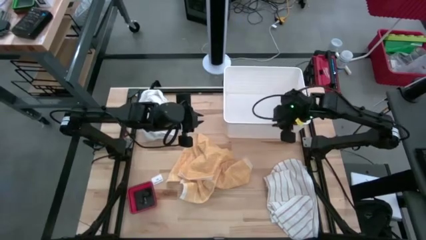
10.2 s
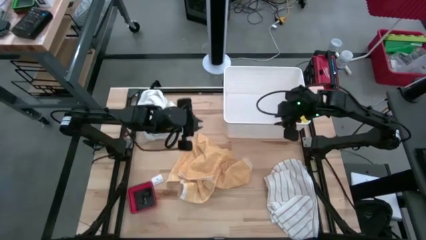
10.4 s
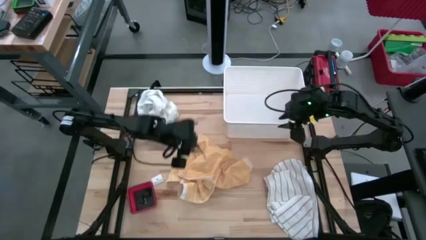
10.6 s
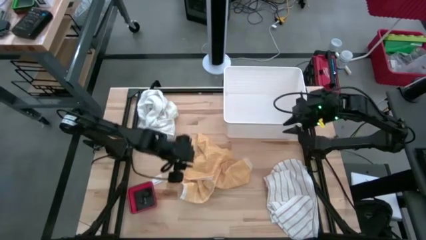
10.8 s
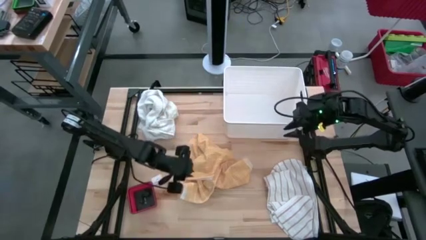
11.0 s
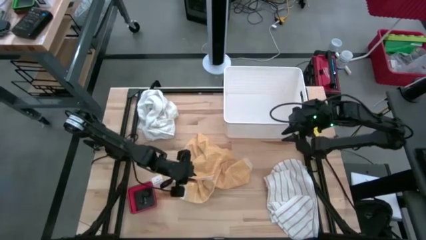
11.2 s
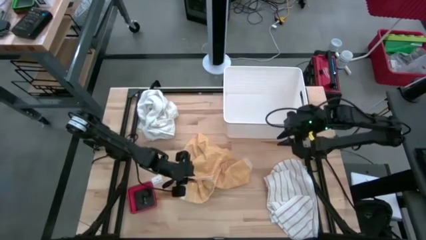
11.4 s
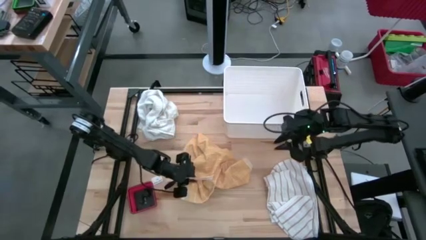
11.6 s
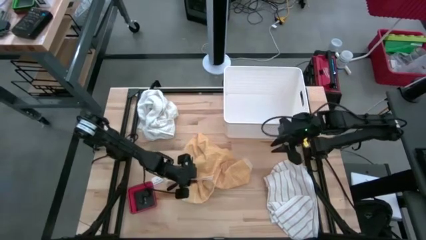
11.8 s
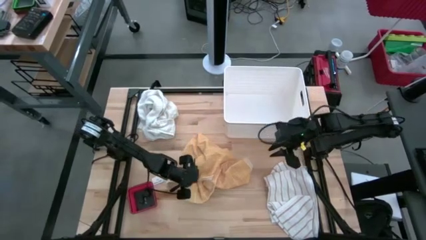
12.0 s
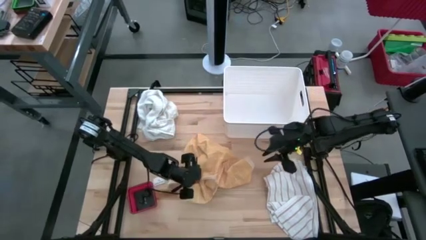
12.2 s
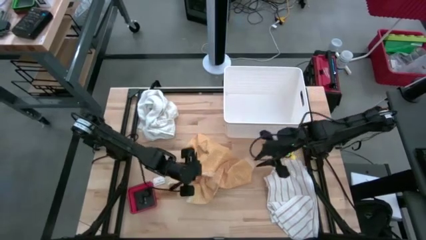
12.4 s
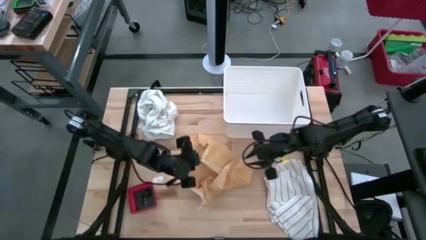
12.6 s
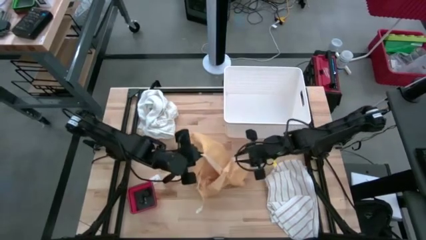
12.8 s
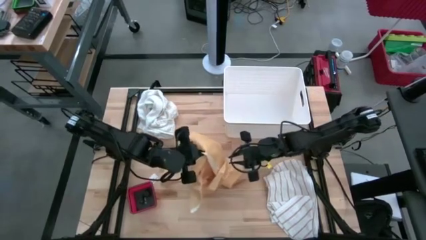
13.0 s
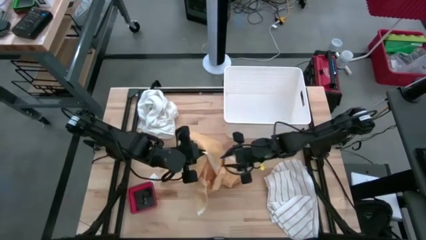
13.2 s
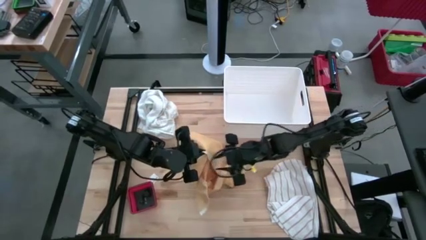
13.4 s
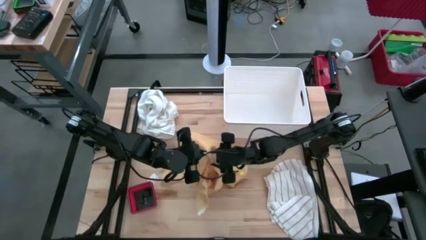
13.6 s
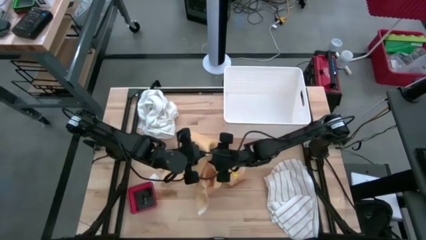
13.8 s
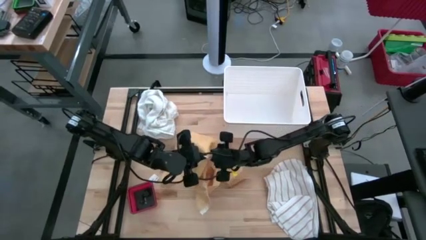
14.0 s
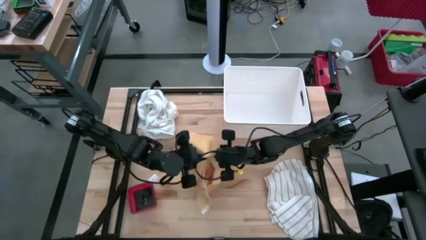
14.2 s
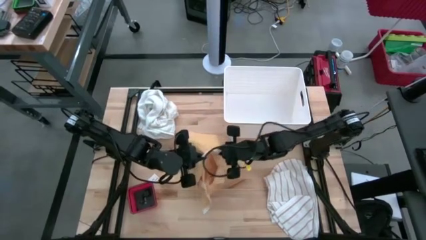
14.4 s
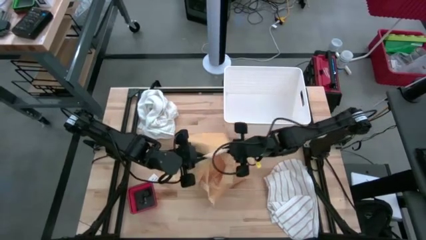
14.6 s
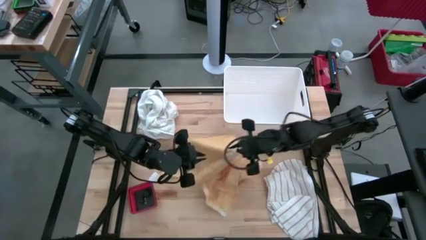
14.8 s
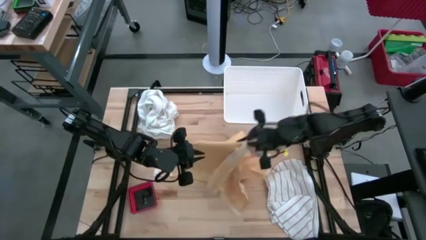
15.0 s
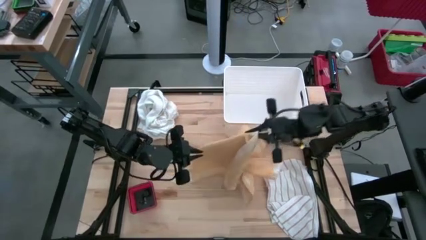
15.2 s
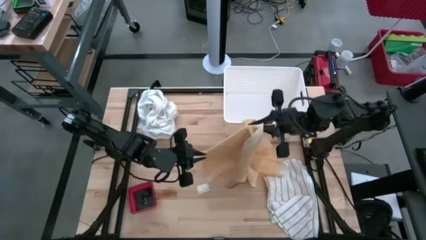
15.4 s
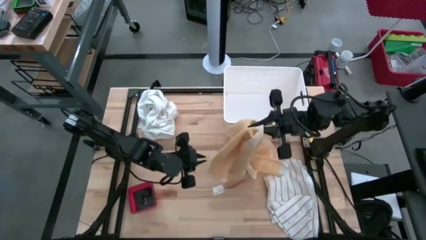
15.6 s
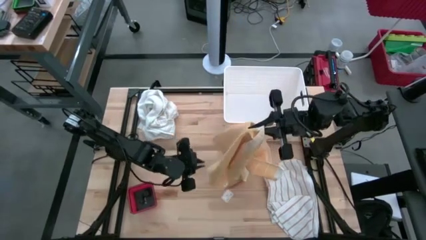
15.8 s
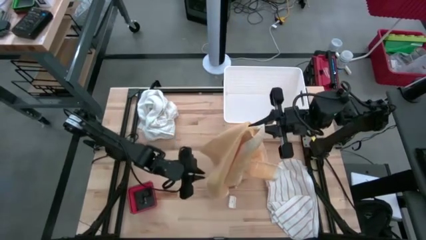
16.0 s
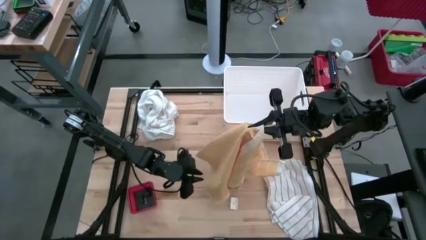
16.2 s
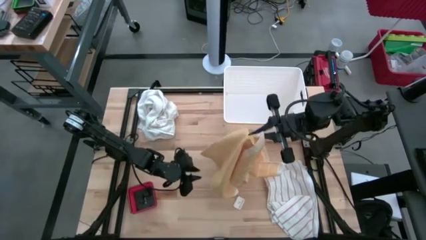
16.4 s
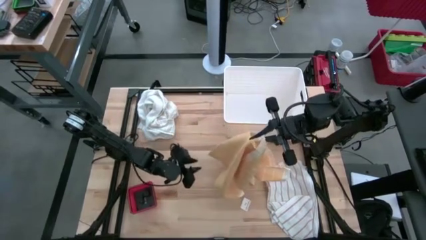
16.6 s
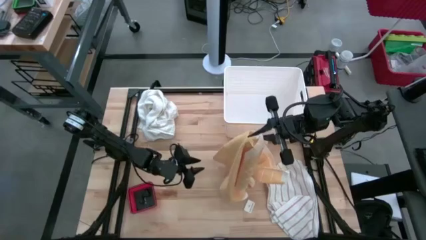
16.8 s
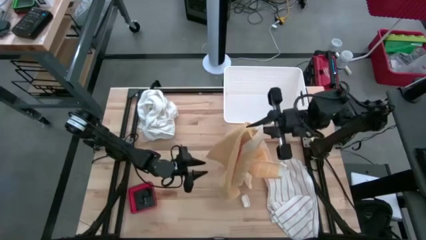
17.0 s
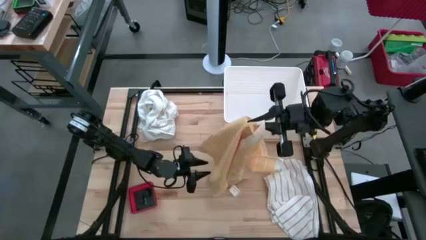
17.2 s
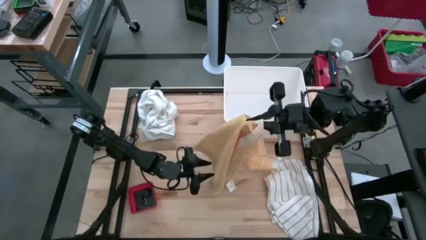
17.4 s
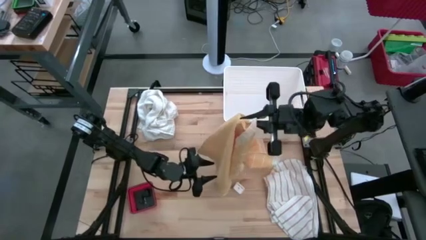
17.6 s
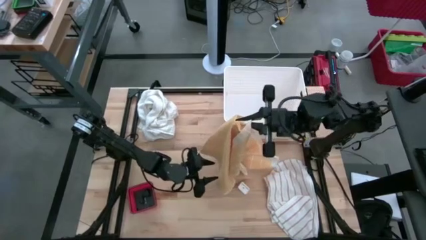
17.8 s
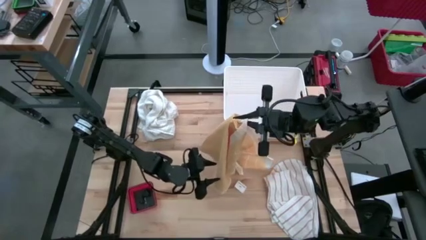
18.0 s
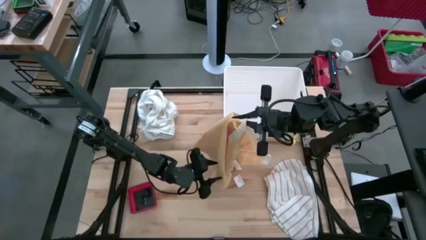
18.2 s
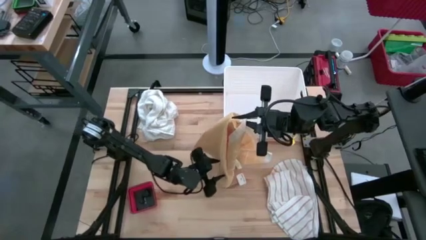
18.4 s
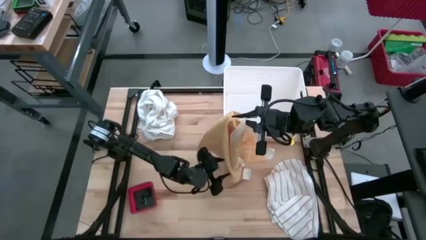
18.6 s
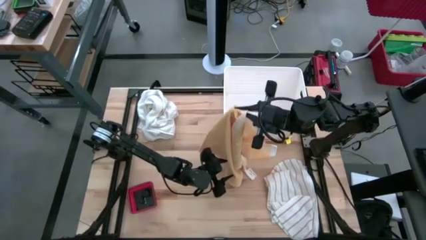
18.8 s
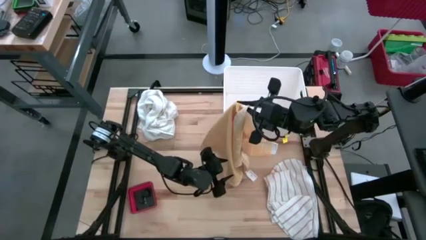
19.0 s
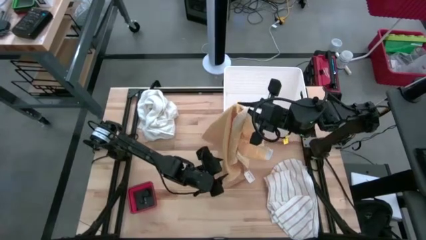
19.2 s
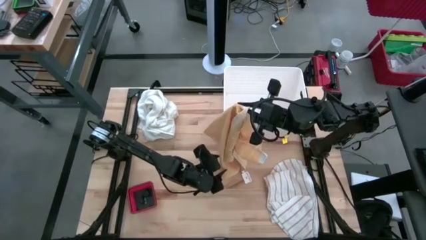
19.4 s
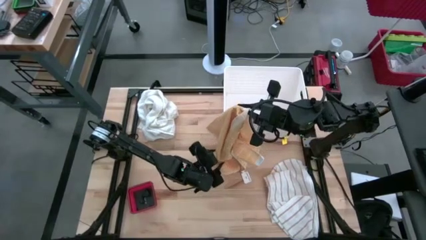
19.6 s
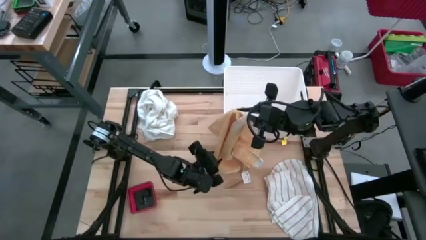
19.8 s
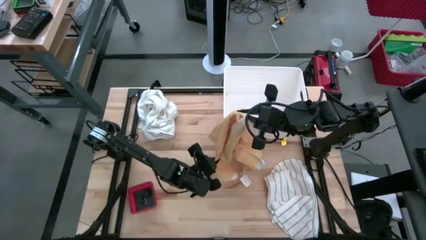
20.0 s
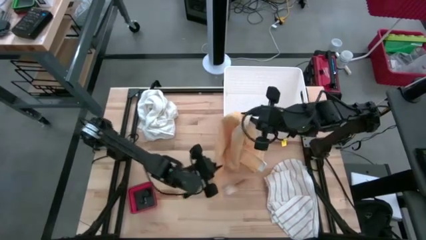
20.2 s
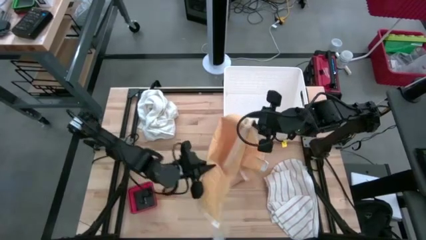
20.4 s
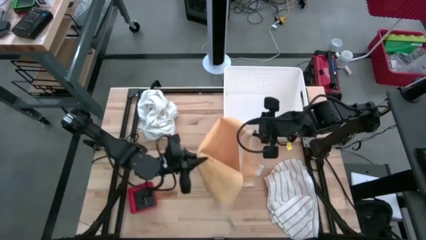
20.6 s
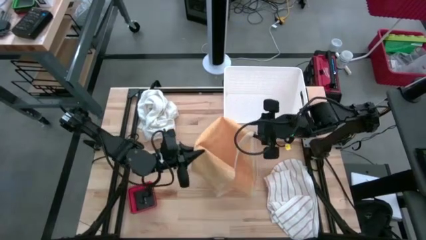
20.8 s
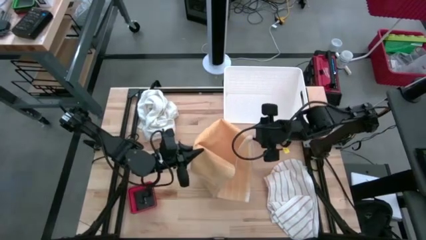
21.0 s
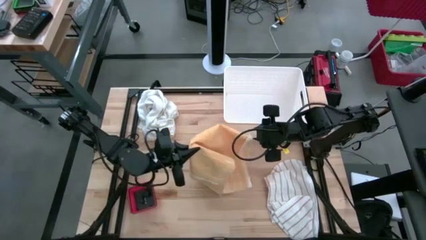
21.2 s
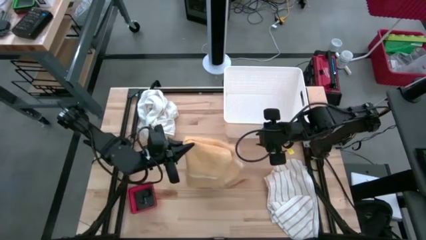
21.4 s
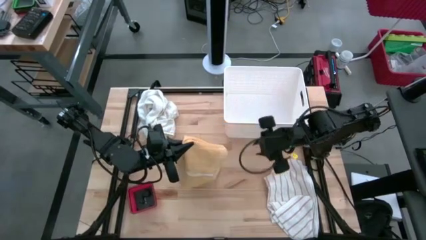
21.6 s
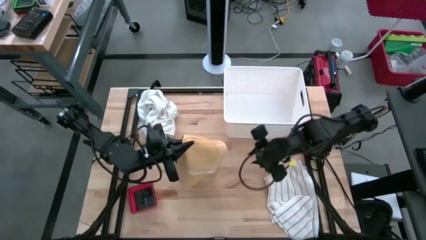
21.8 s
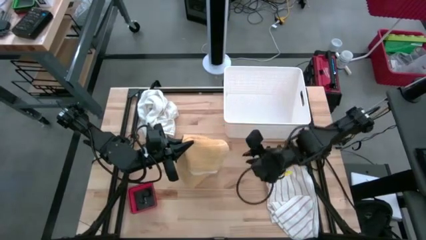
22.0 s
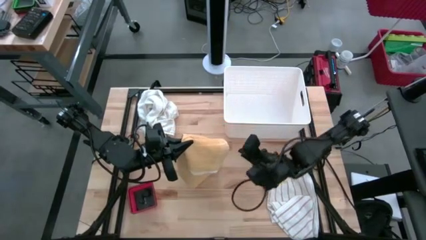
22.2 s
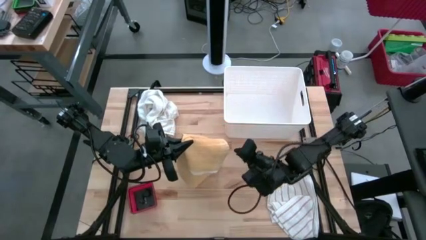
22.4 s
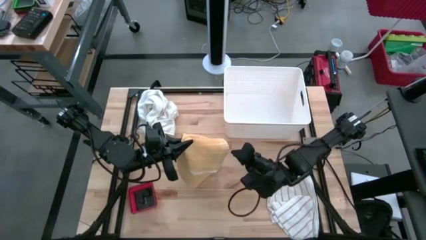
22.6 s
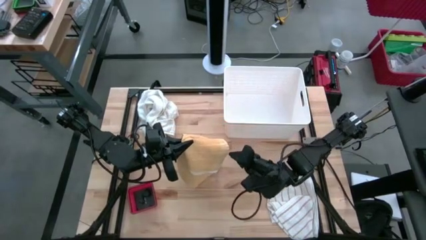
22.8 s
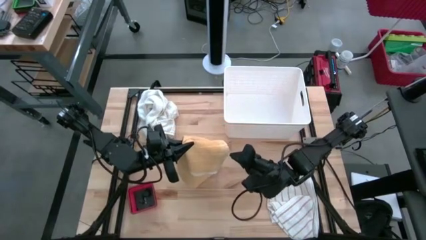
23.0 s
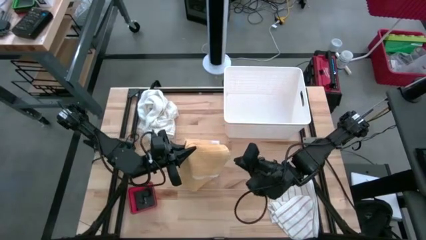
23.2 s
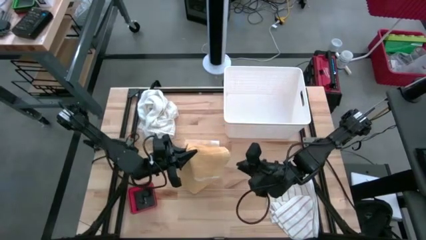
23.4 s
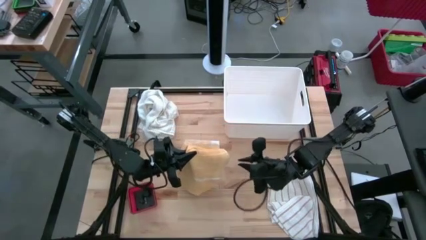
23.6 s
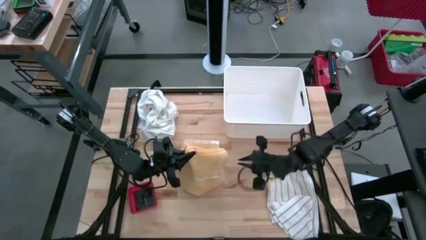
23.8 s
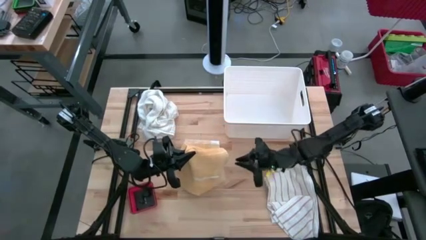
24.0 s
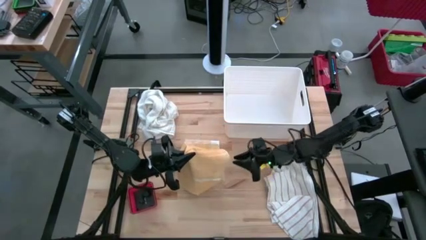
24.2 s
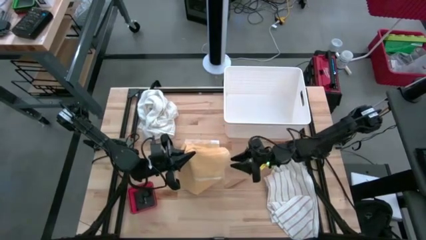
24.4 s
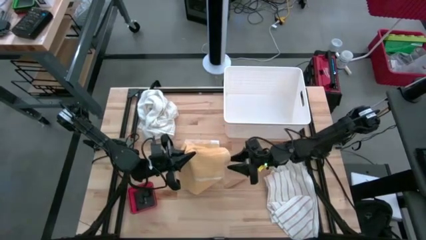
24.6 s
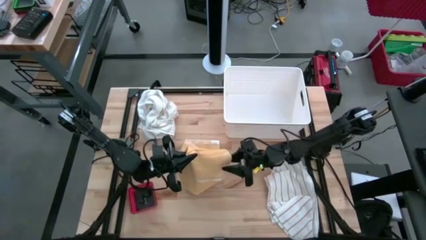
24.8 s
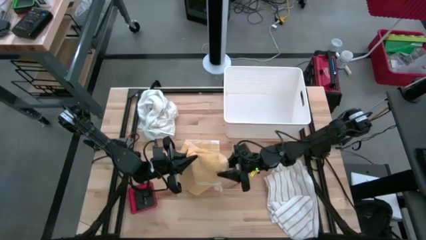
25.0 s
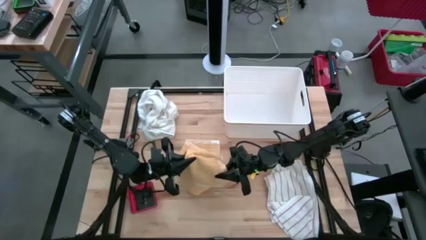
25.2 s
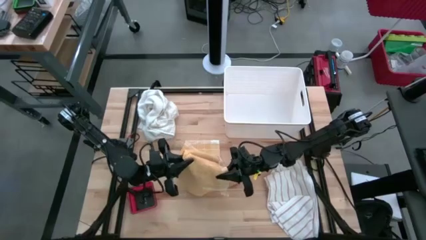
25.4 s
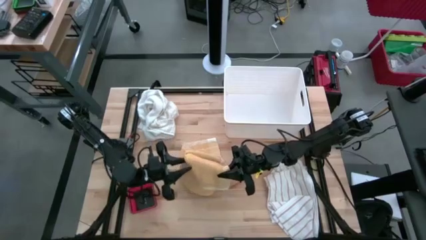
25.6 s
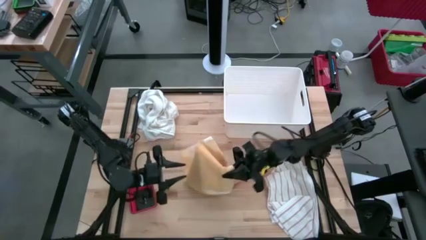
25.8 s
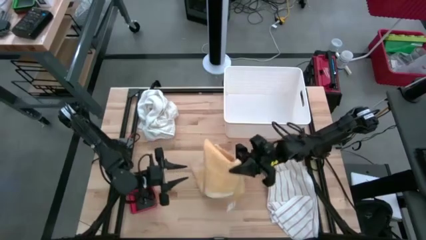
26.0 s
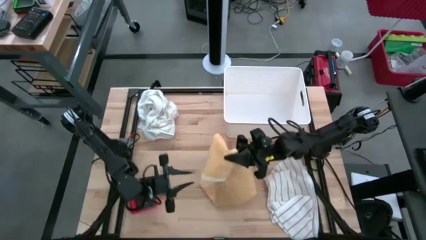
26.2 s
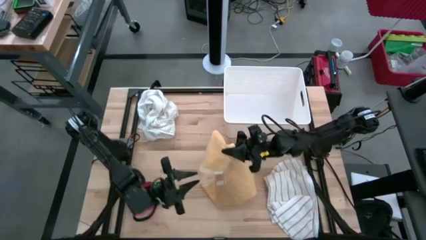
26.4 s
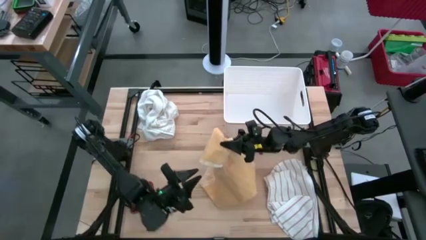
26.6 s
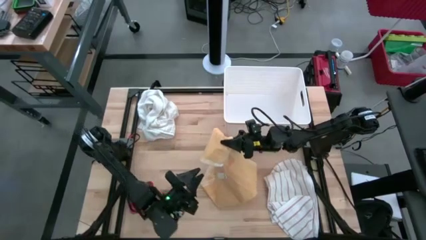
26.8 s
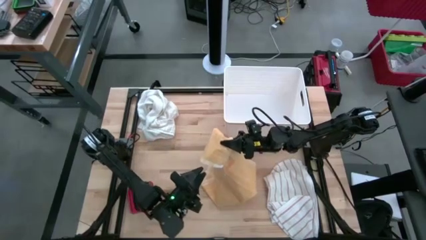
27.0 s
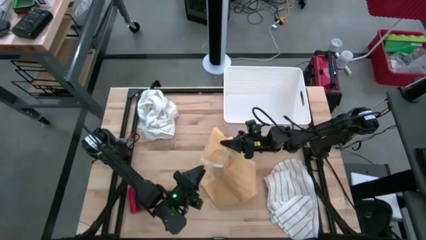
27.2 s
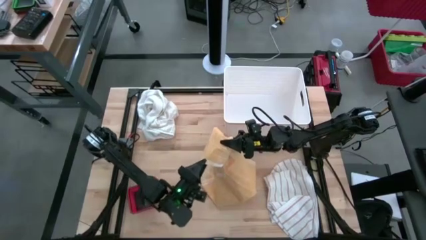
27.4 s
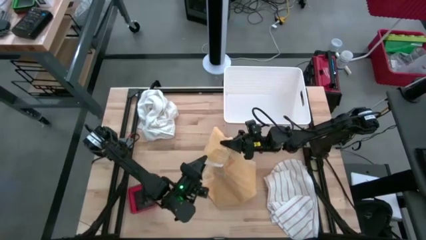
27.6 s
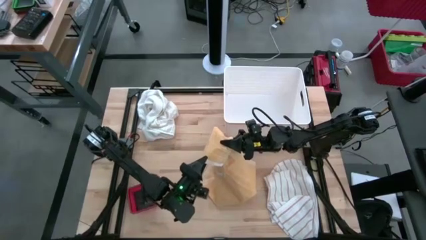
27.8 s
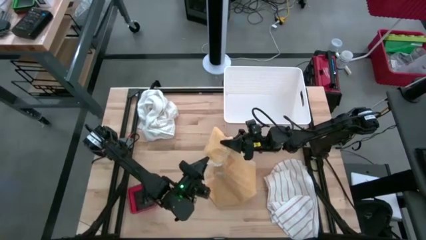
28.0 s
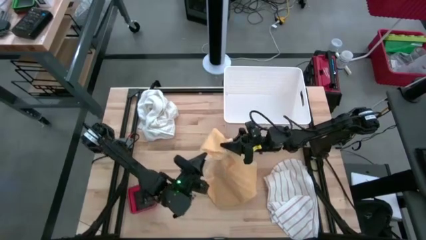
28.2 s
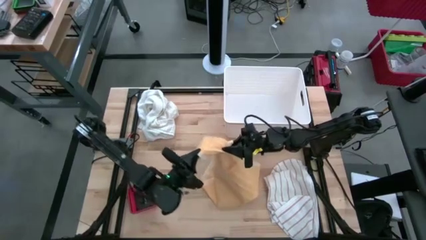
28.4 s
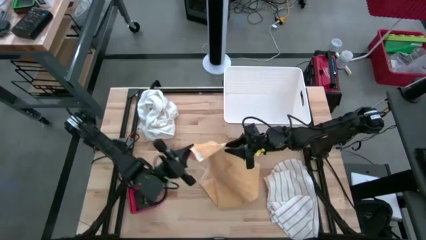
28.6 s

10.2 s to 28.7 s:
Task: Fold towel
Fold the yellow kitchen towel
